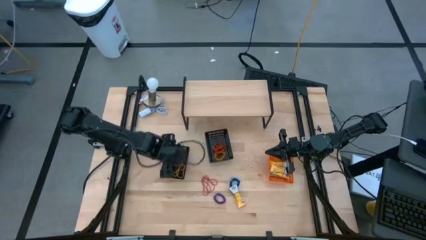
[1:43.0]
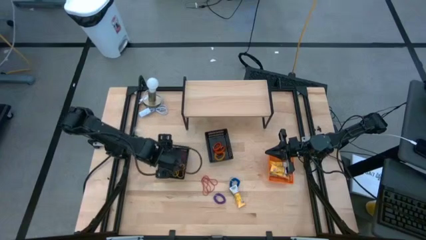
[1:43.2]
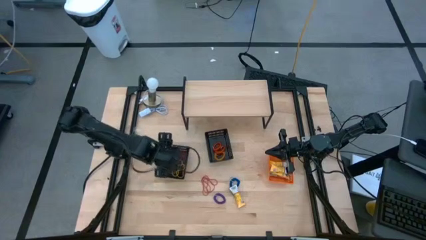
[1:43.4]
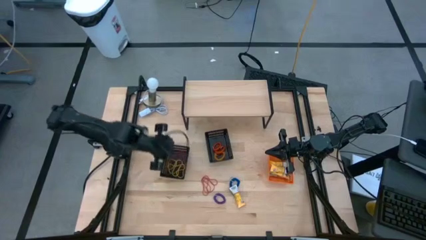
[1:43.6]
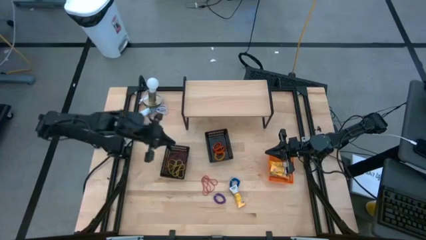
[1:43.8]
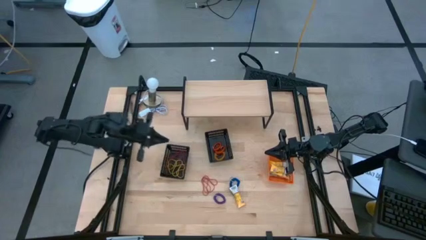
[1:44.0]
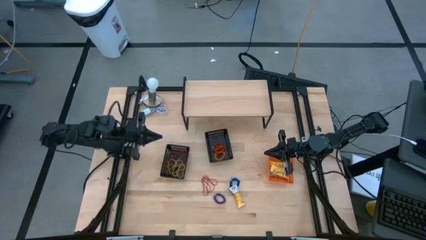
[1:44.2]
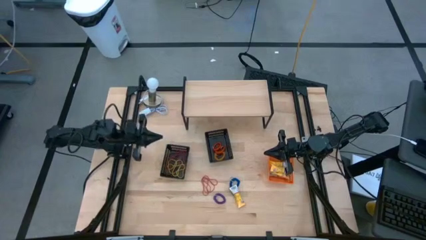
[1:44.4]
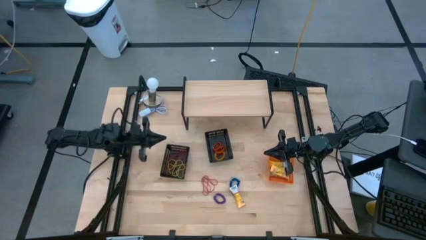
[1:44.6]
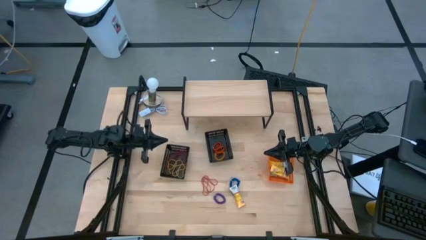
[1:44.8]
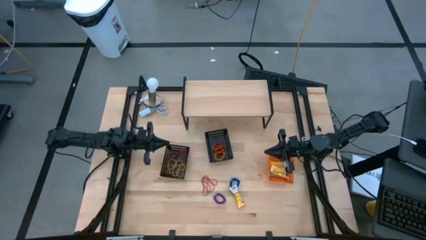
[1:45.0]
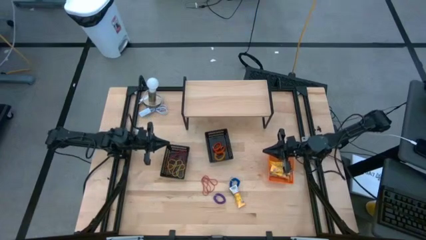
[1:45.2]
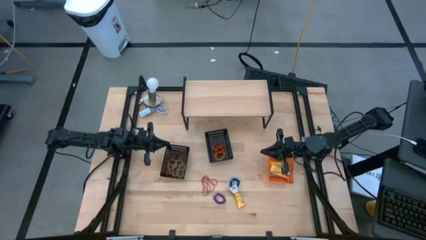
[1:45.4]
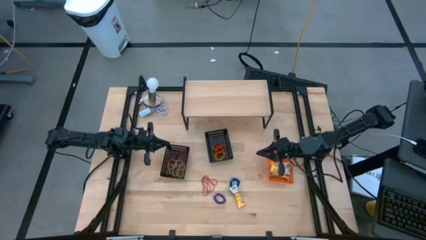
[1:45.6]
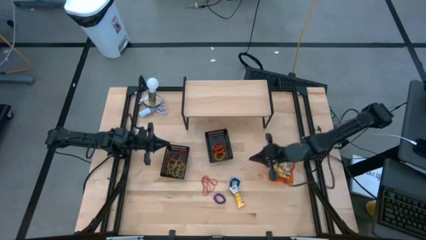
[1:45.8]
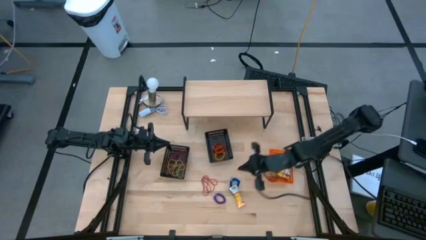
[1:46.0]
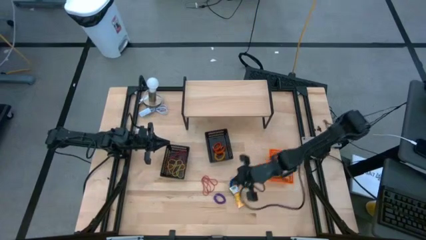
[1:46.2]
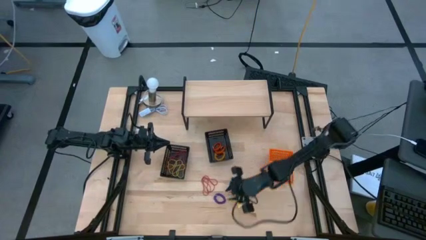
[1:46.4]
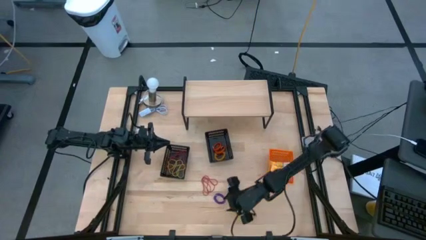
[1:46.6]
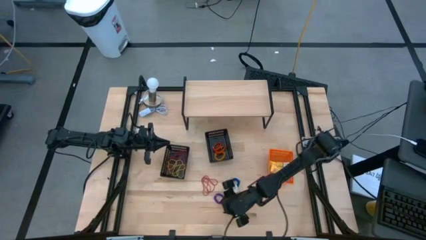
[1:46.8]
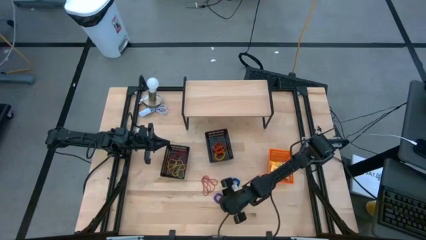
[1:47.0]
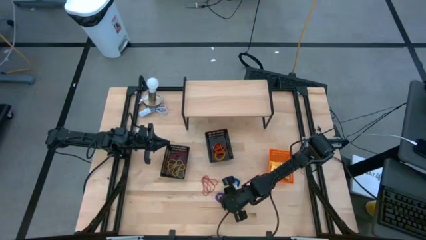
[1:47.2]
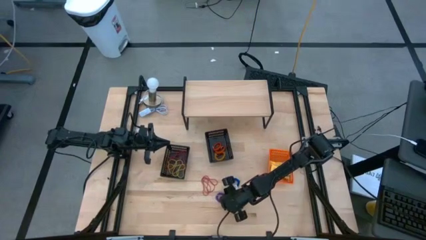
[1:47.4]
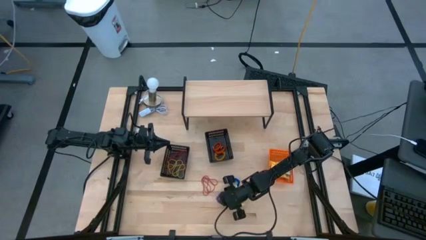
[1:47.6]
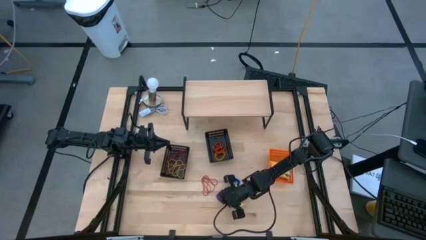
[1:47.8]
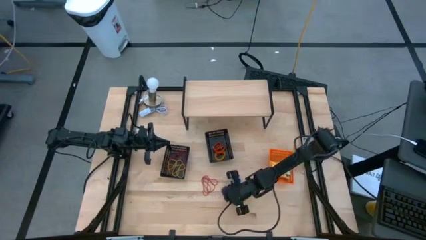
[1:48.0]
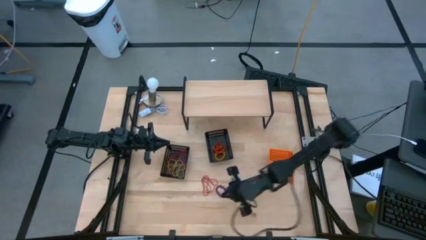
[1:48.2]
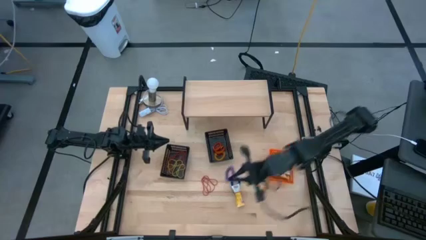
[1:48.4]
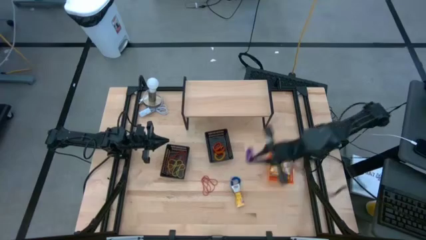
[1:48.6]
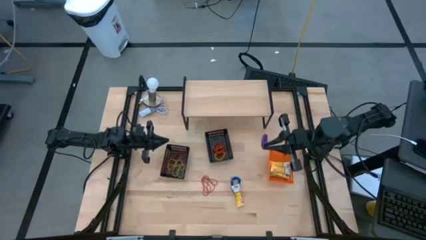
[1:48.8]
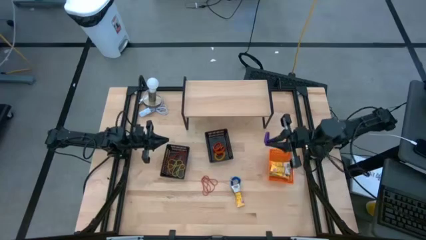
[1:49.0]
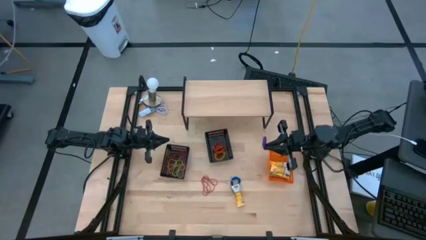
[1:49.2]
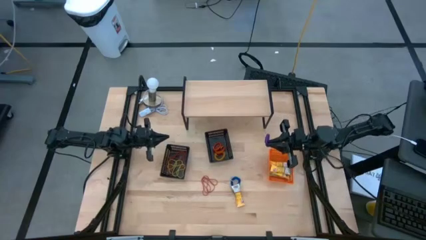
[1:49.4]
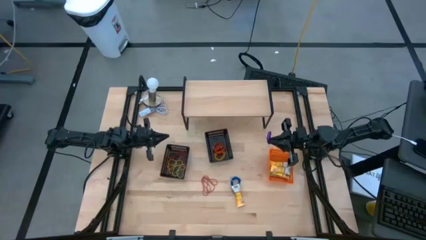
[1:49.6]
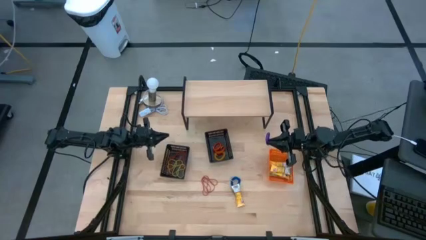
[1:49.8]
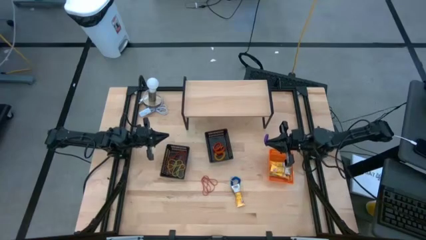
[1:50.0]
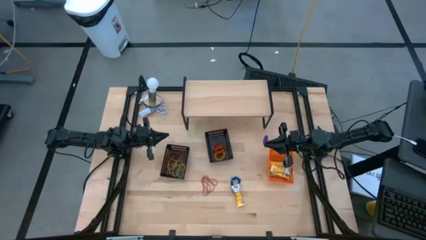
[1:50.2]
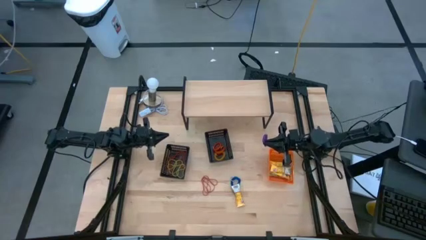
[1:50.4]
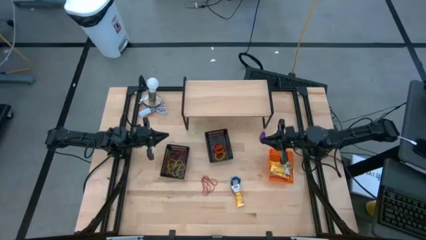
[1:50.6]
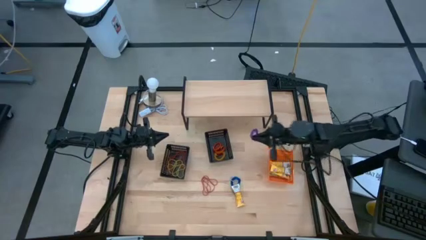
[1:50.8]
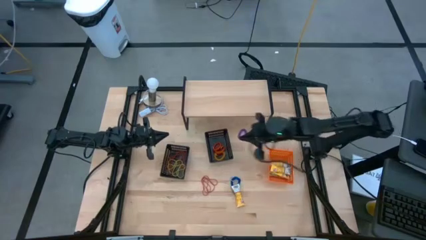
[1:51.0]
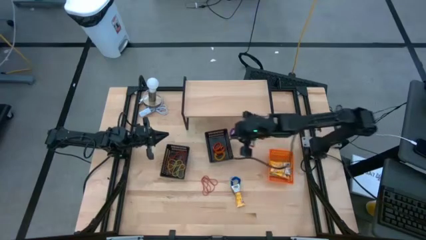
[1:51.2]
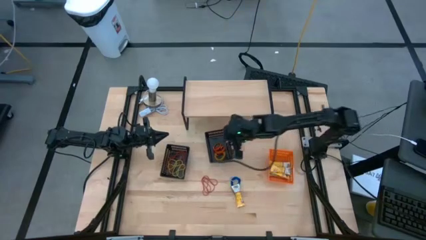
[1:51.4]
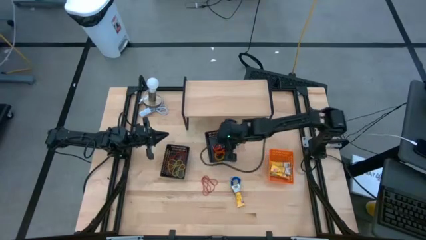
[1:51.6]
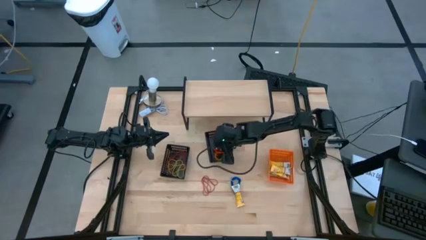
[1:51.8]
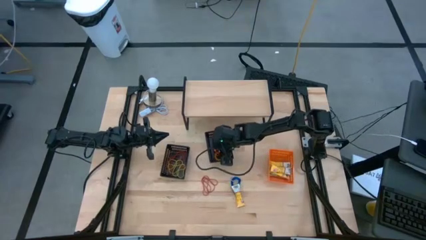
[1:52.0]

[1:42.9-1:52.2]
Task: Pick & Place Office Desk Supplies
Put the violet spring keychain into the right black bin

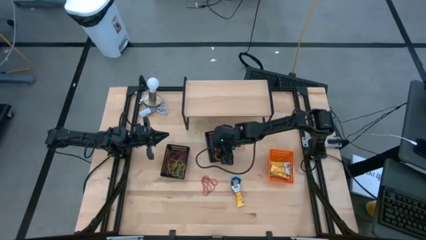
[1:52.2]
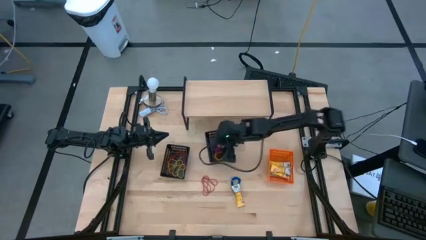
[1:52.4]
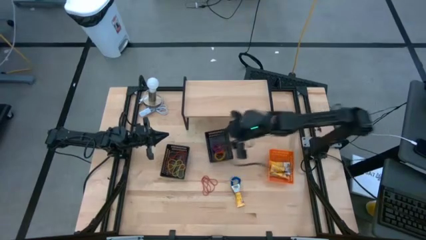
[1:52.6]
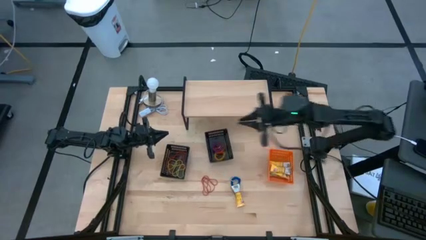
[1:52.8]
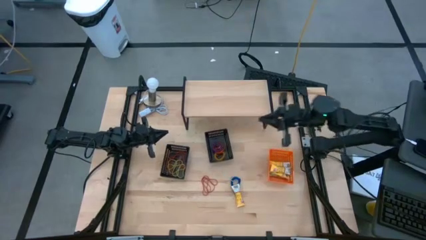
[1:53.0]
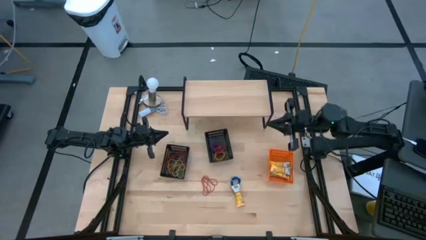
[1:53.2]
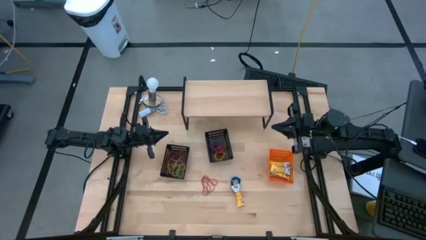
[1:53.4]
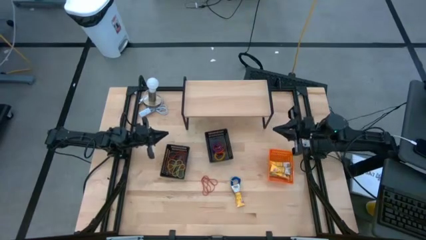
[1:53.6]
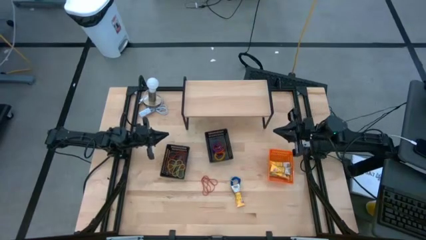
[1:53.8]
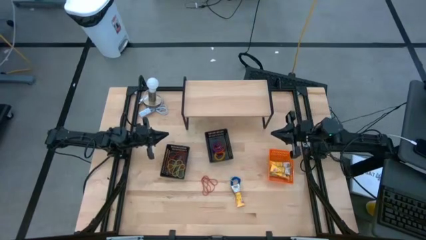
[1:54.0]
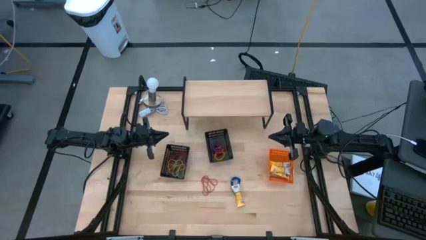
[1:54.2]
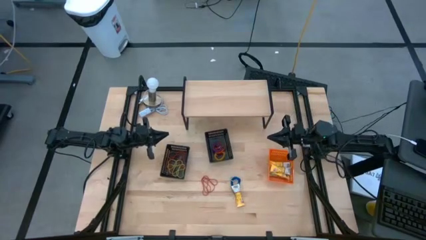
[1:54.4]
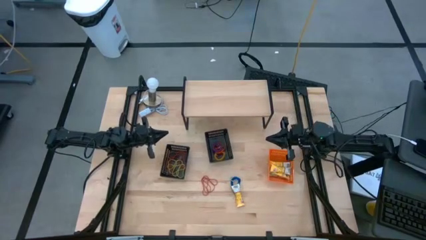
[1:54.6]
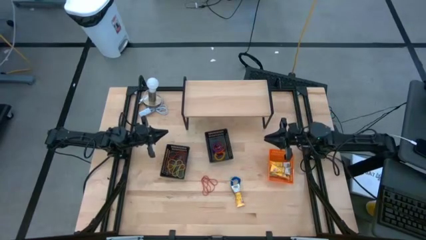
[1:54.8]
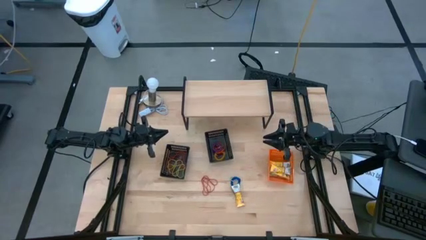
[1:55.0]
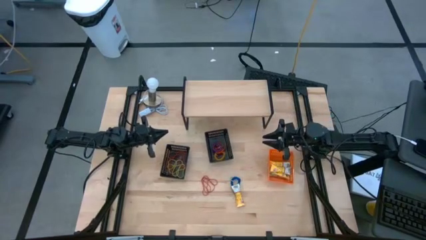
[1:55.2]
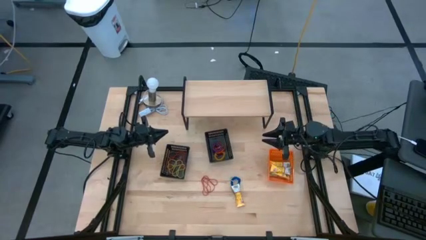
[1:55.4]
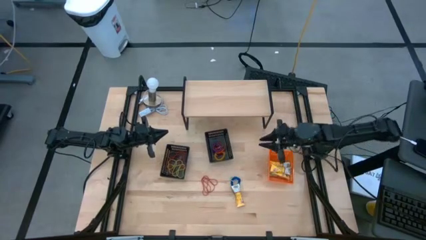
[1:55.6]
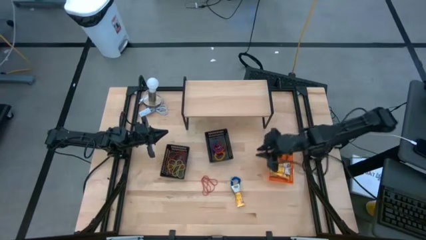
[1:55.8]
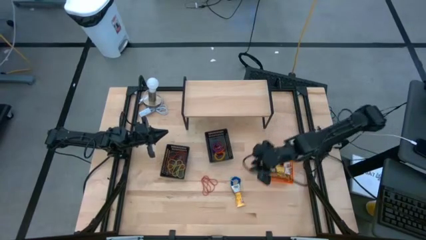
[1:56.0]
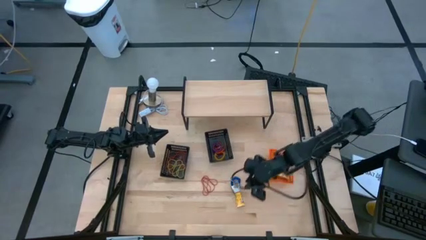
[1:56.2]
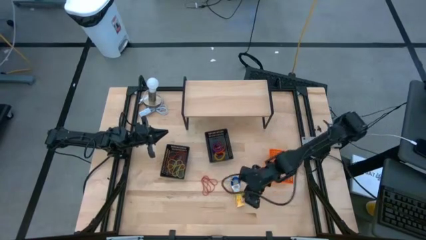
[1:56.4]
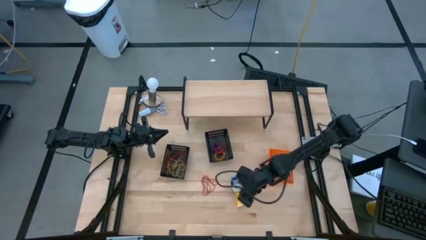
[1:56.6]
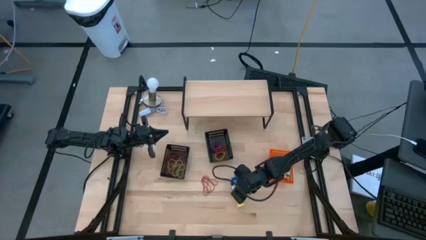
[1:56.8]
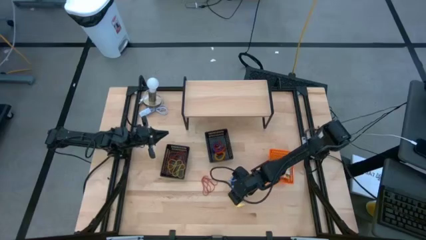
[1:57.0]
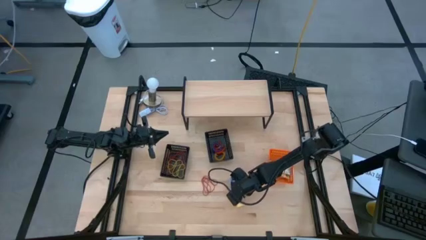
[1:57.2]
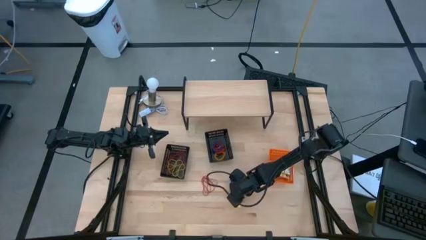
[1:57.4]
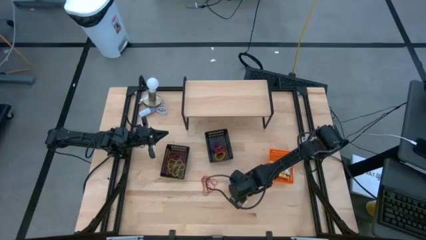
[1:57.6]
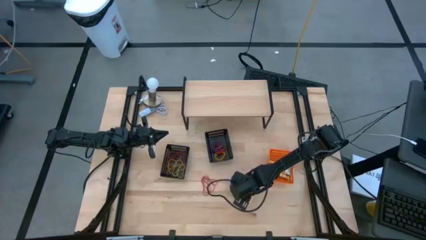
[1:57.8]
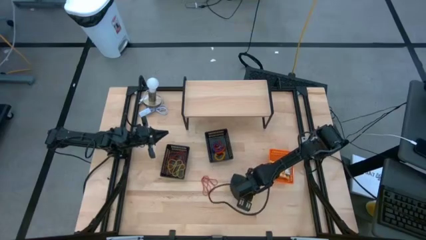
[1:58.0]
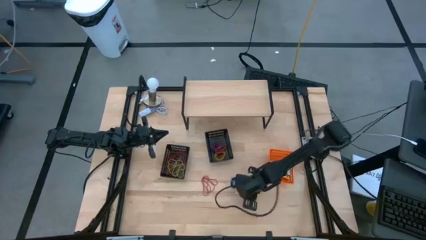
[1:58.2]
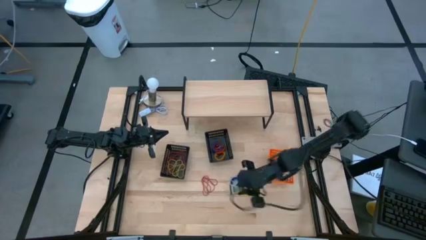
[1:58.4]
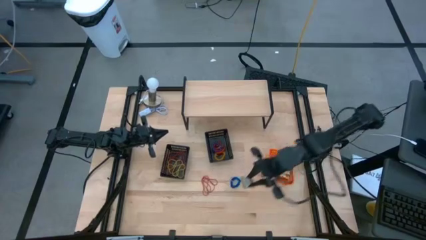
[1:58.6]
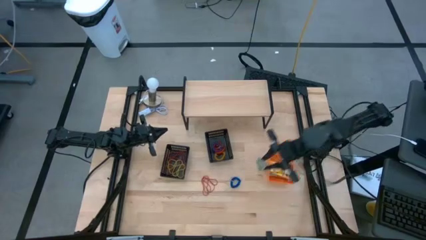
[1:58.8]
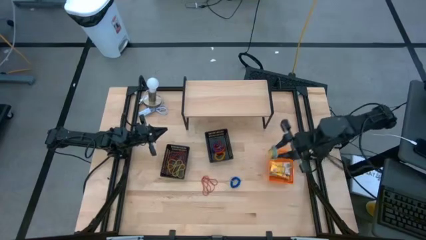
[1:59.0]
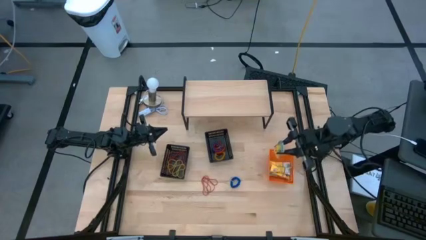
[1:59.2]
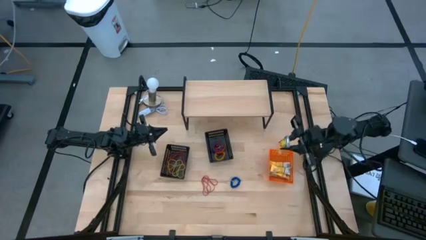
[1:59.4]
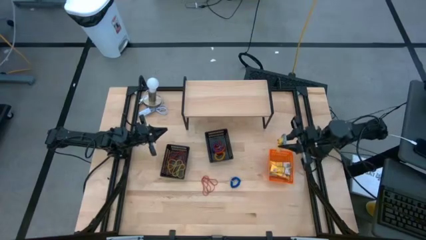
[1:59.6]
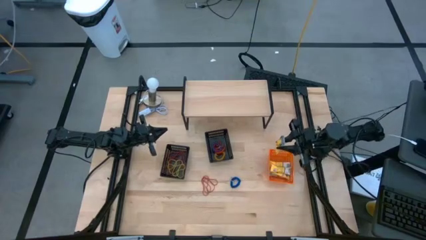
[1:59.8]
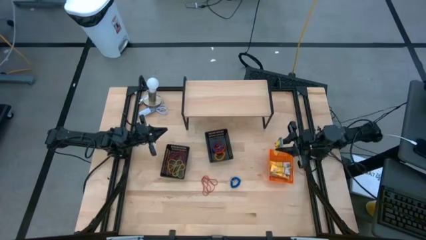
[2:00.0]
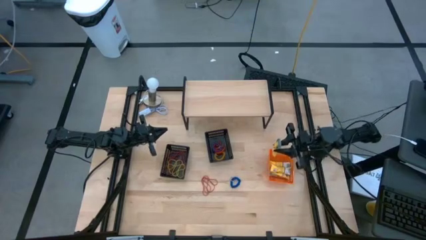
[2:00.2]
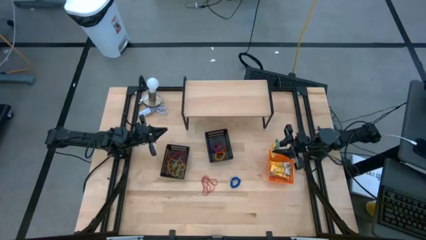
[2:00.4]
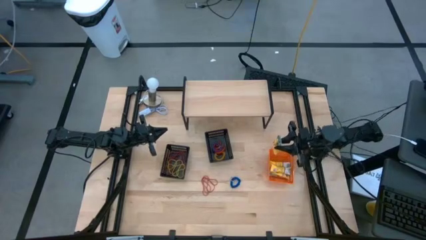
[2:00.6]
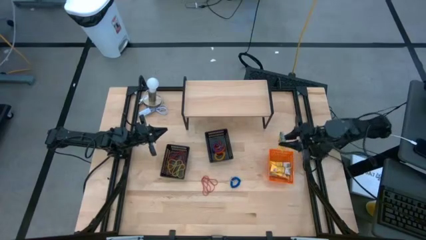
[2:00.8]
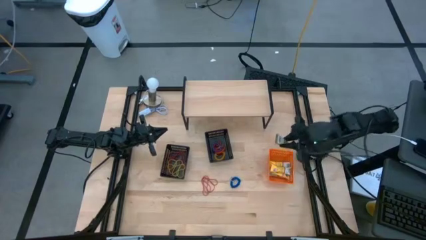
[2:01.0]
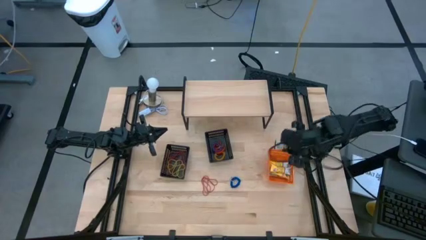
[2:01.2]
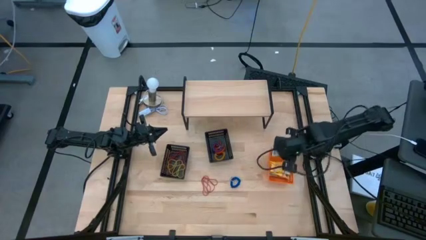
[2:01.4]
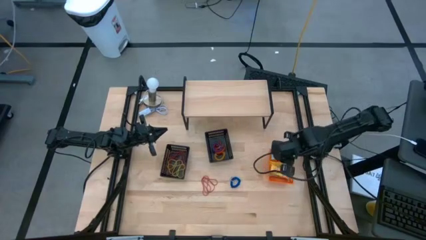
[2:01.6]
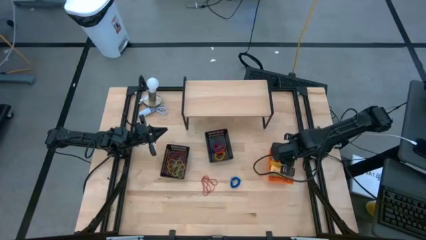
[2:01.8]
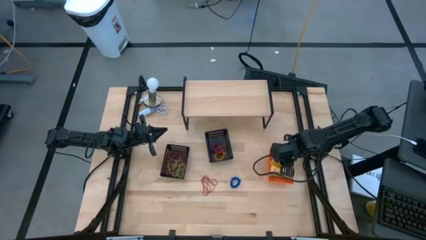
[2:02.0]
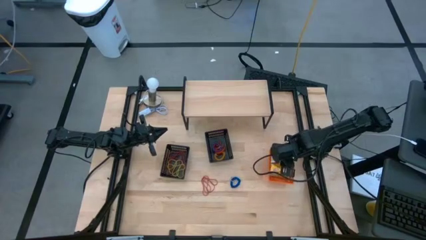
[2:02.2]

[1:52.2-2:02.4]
Put the yellow crayon box into the orange bin
